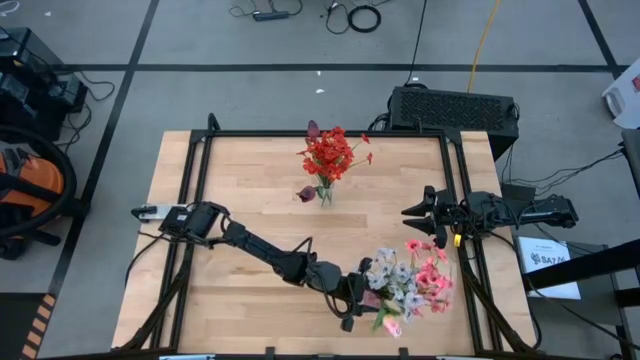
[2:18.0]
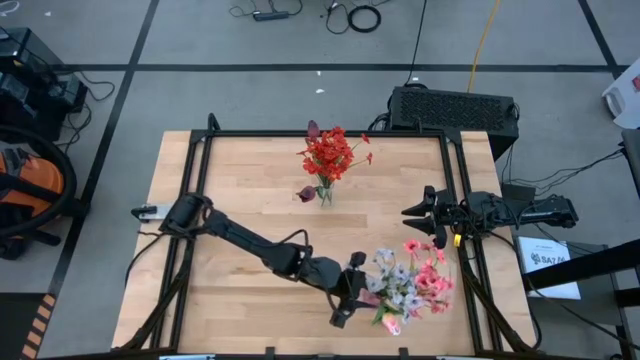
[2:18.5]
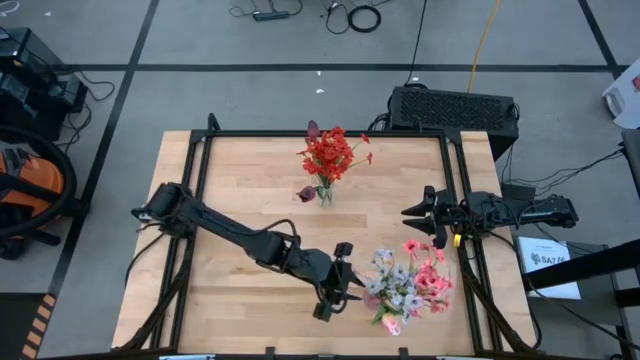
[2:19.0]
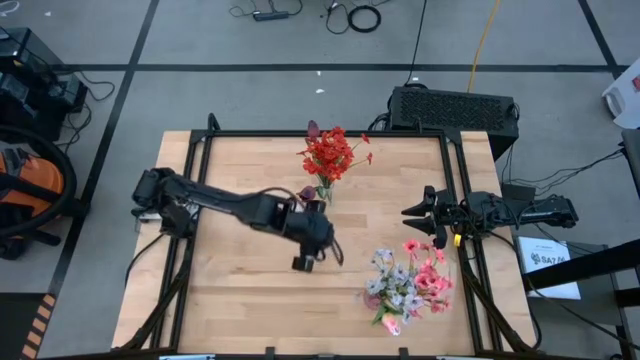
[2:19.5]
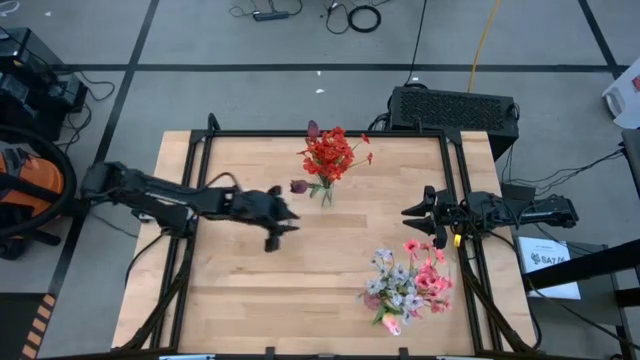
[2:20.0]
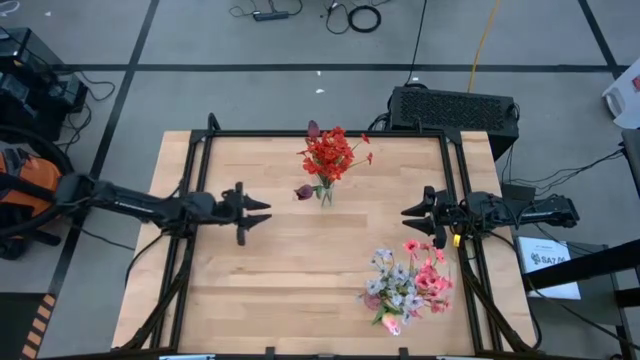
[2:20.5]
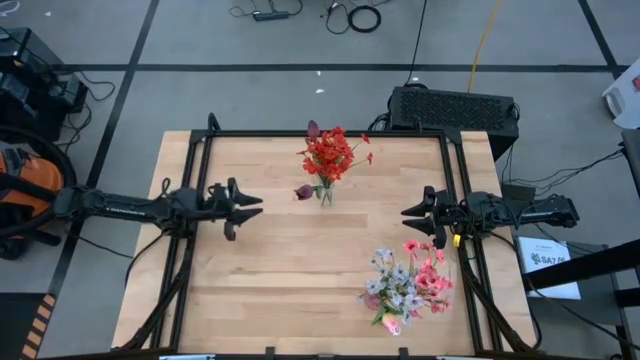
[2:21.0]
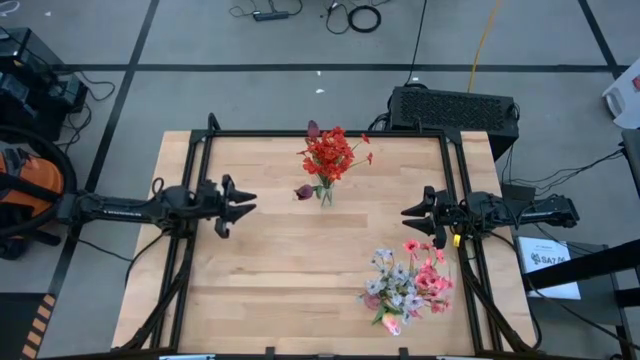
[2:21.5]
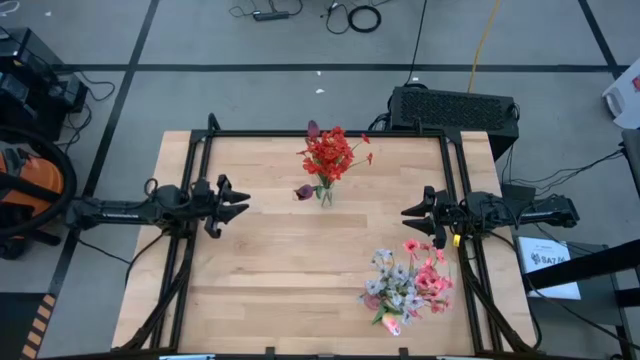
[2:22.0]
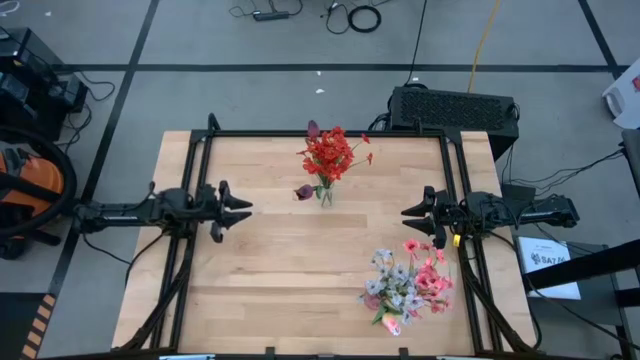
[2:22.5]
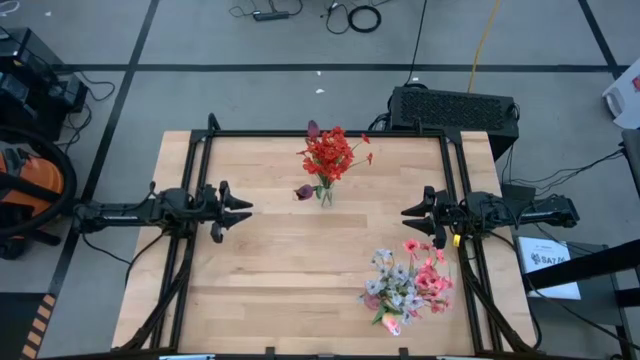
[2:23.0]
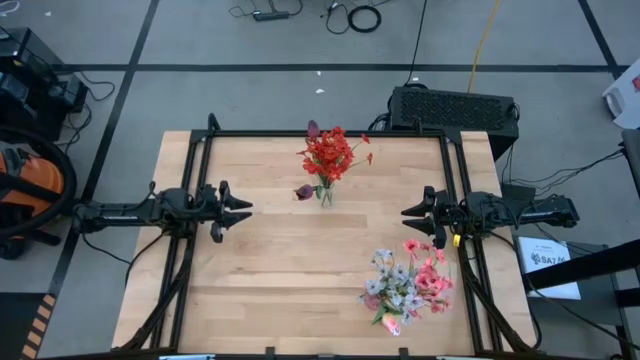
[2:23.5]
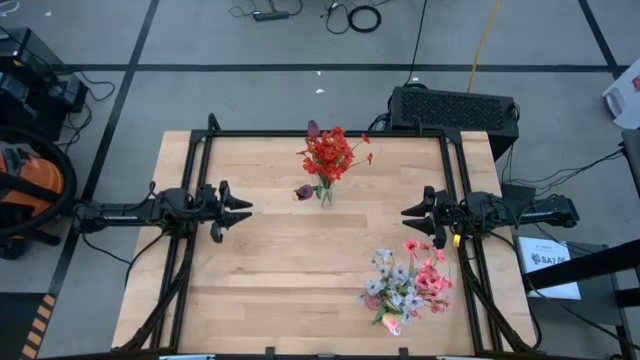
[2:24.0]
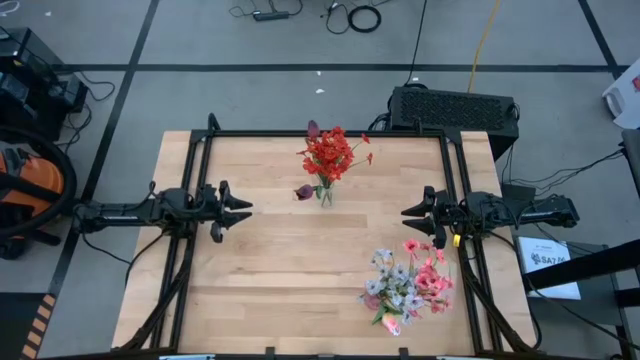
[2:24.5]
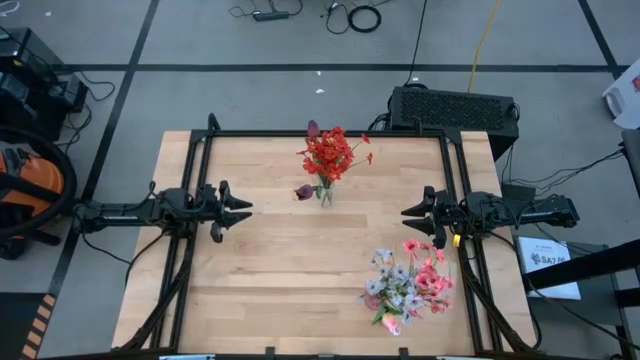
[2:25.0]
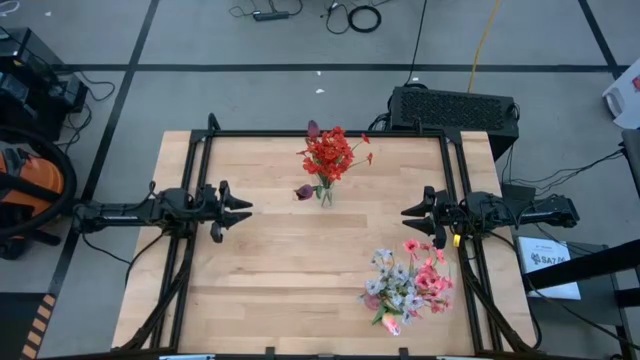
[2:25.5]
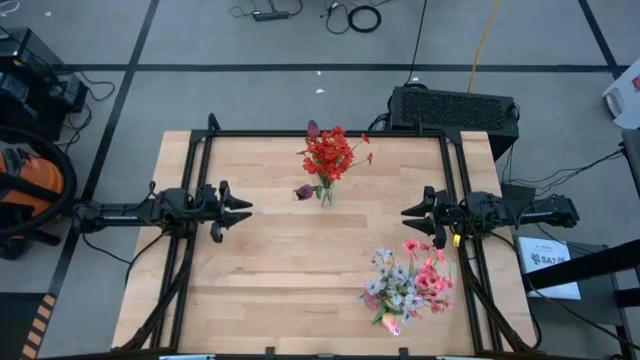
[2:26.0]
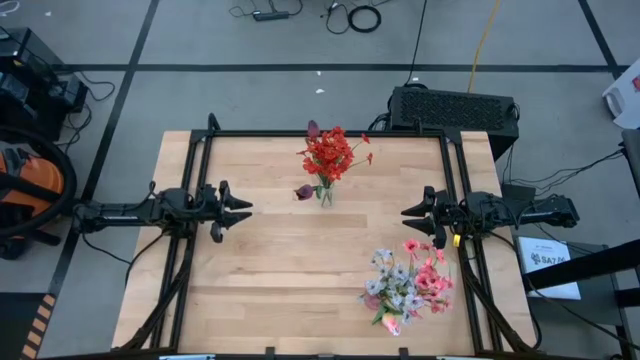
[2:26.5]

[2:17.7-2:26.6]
Task: Sort flowers into vase by color
Return to Home Position

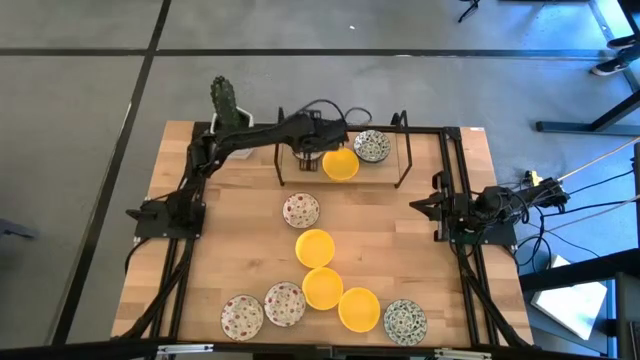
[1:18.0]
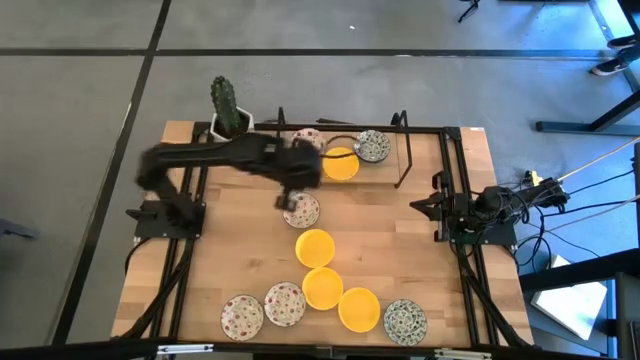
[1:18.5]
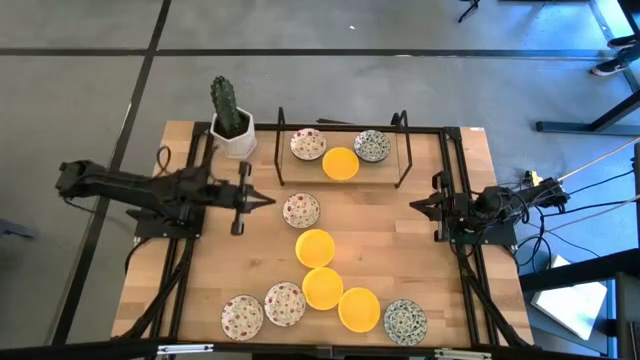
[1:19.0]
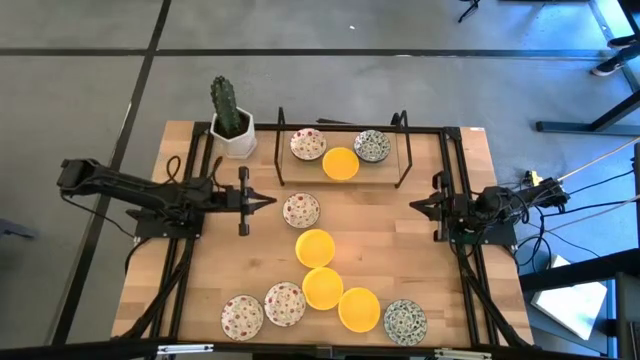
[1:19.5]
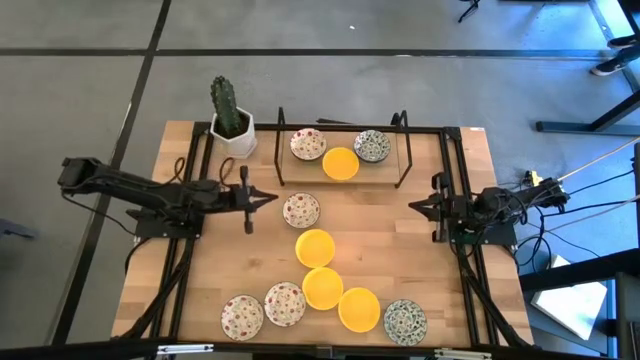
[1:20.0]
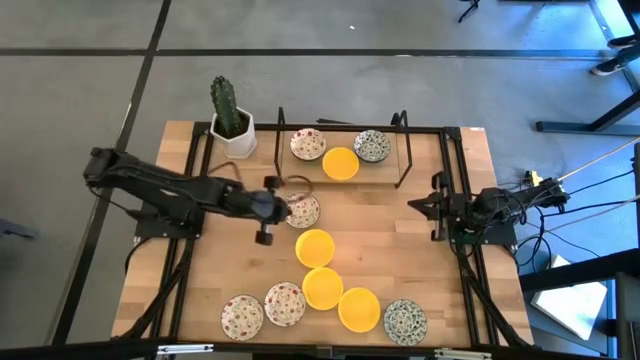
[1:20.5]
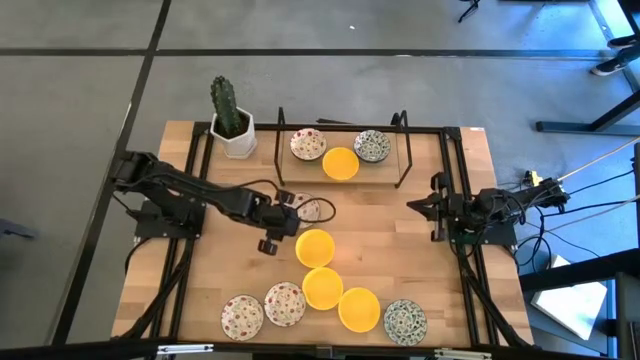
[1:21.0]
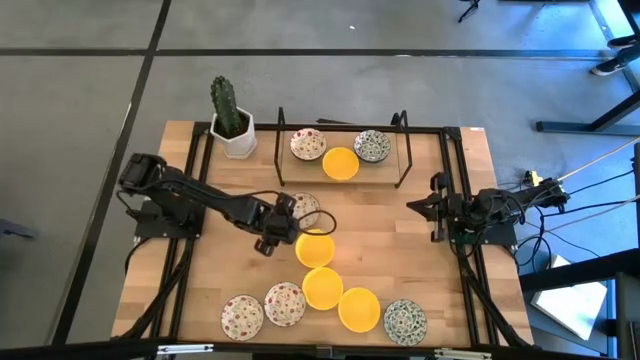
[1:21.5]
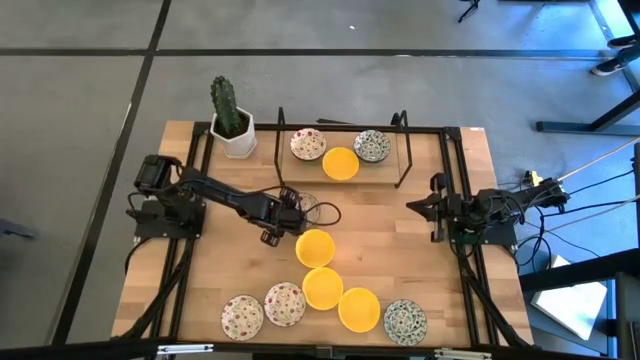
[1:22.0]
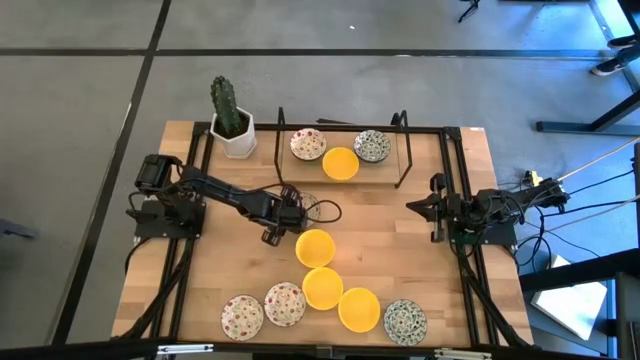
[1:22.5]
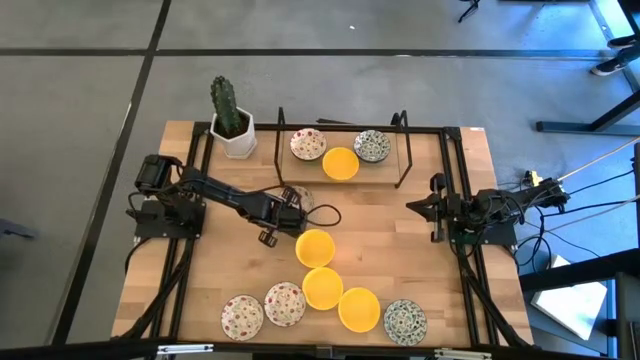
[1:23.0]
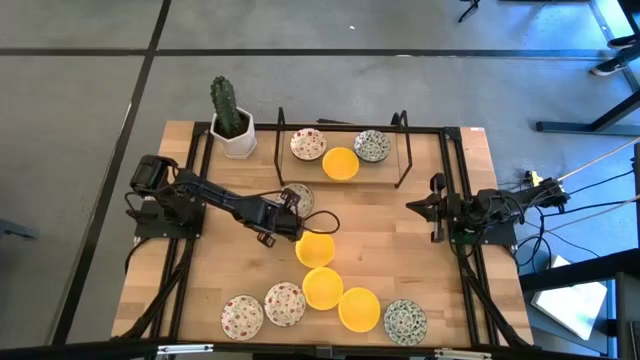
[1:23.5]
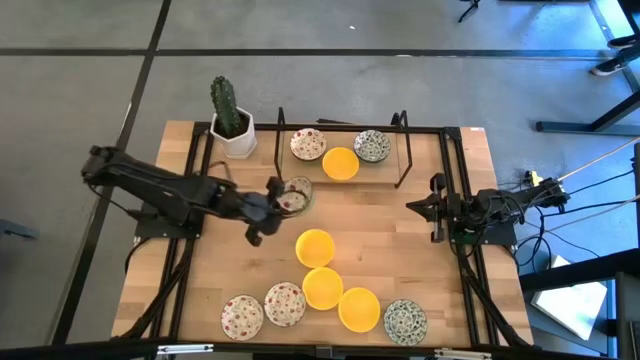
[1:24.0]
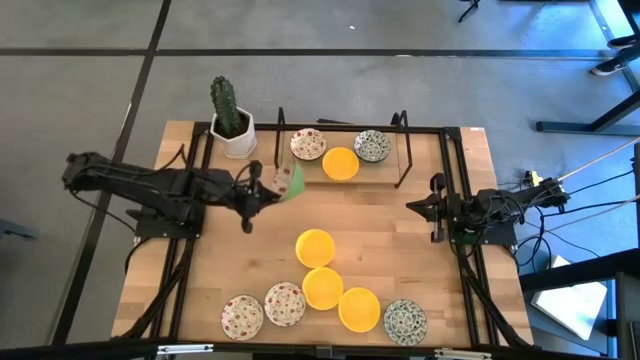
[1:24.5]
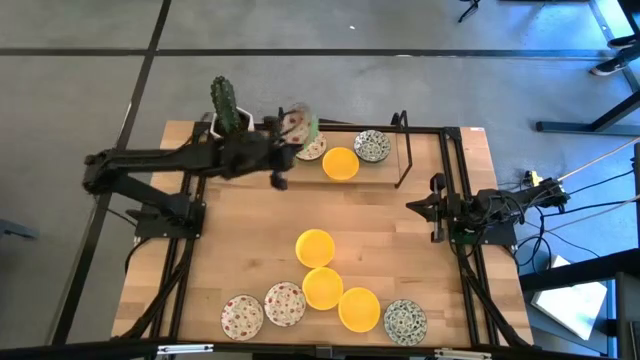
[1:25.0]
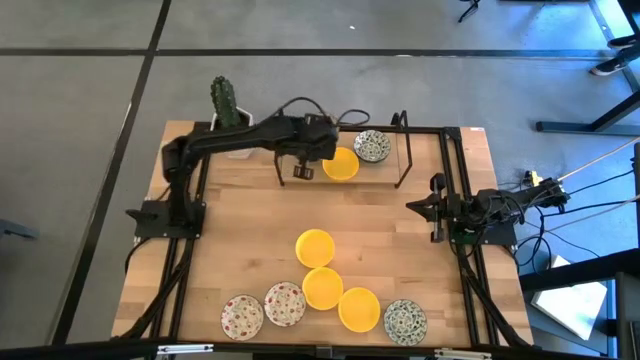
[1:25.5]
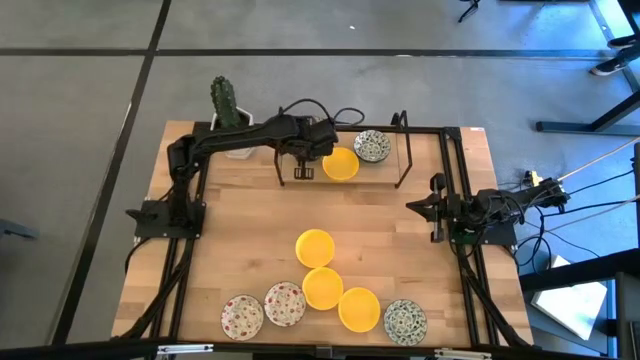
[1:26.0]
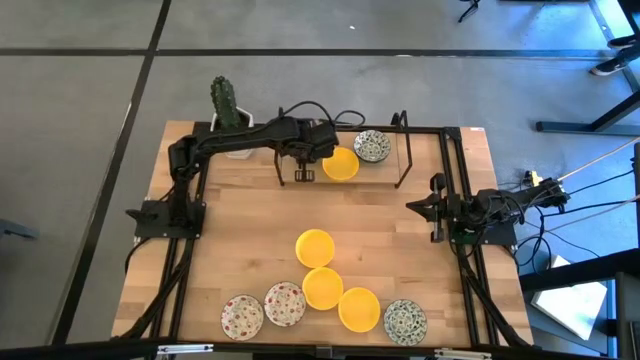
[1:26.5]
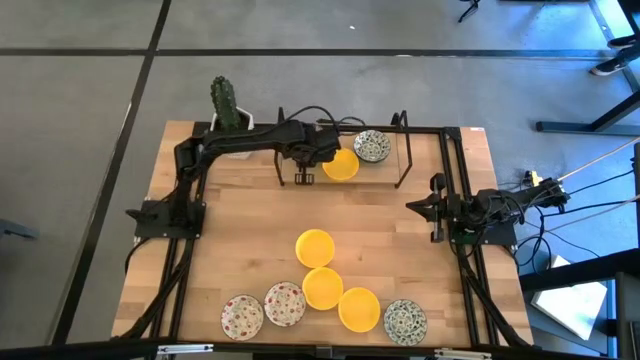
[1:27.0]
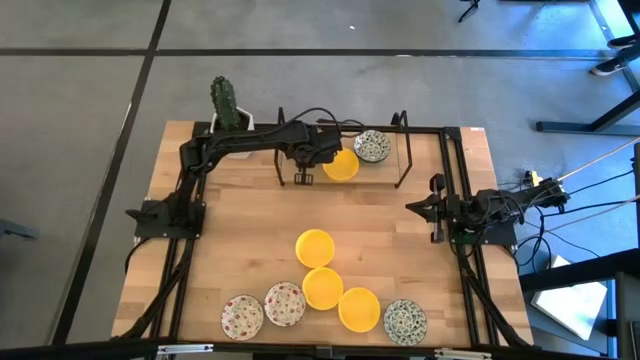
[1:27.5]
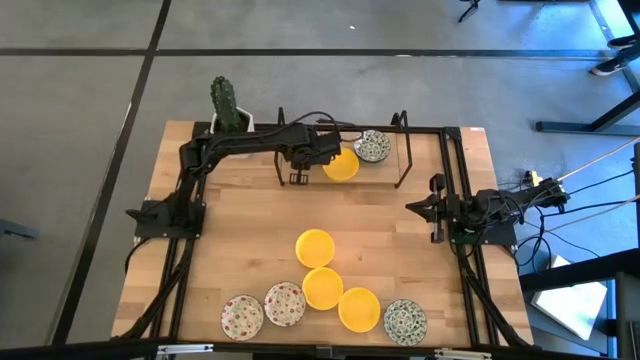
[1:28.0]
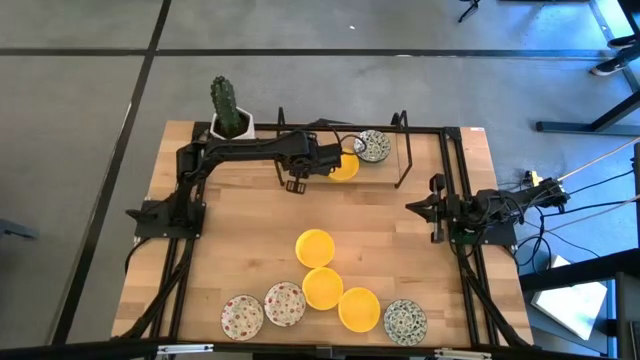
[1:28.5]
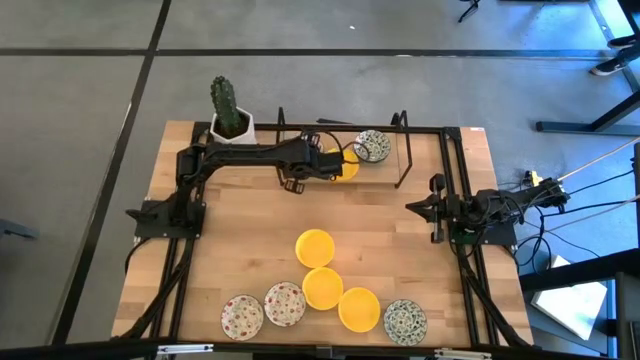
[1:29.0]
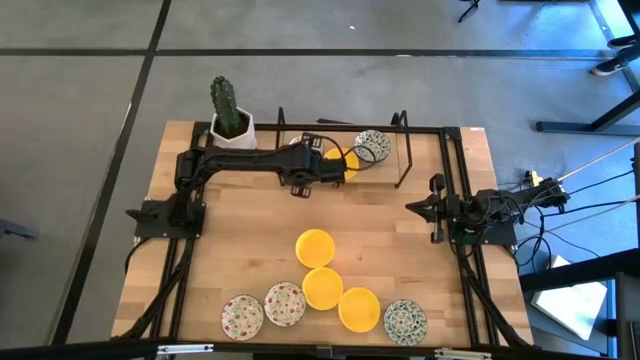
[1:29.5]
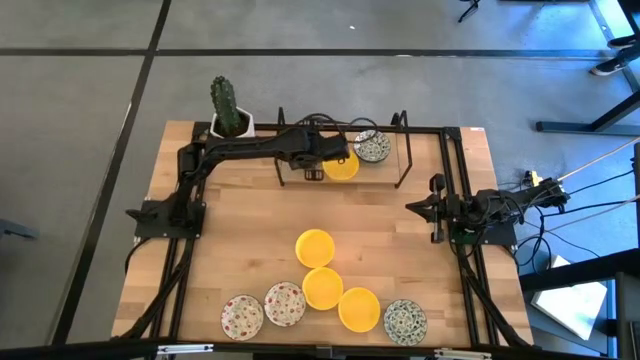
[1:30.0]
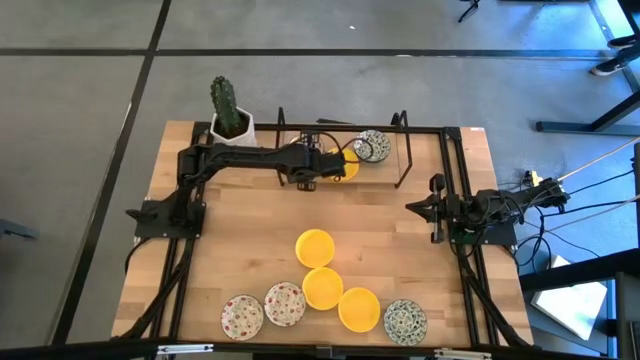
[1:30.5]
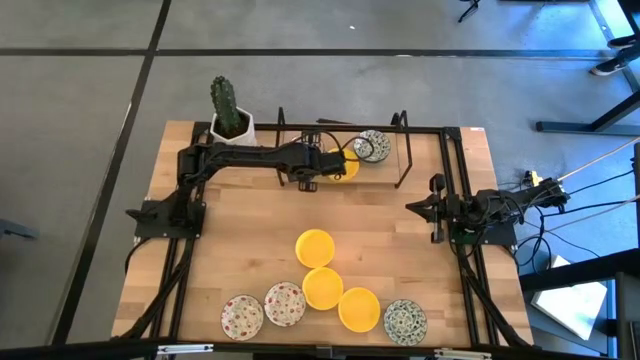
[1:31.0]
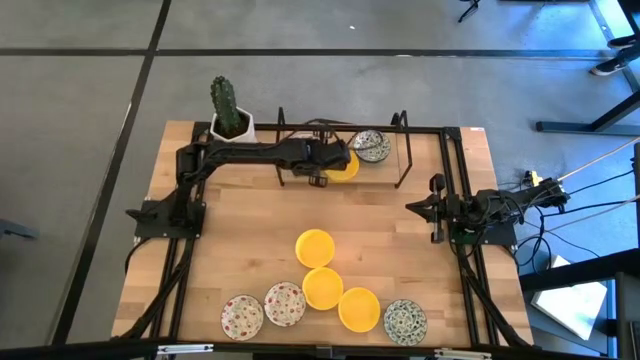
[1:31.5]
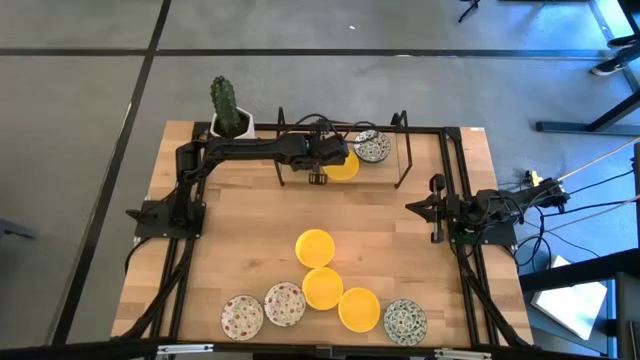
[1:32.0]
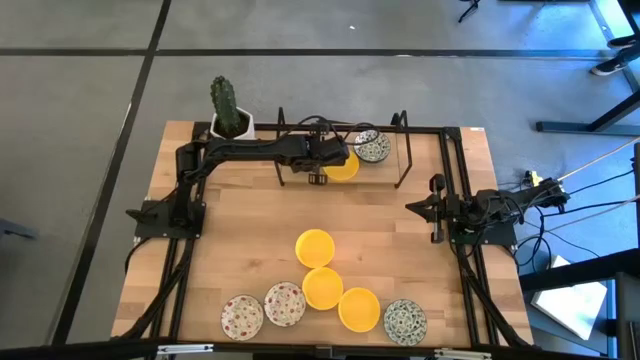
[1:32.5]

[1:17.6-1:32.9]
Task: Pick & Place Mini bowls
Stack the white red patterned bowl on top of the white red patterned bowl on the shelf
